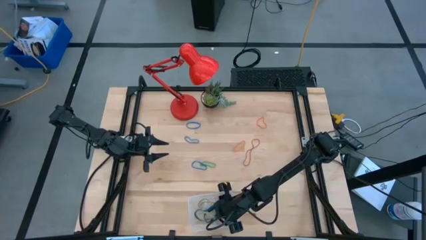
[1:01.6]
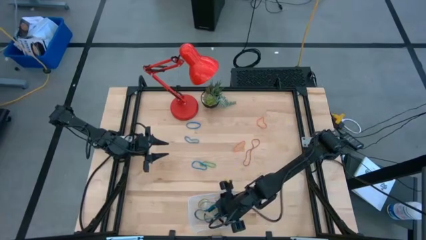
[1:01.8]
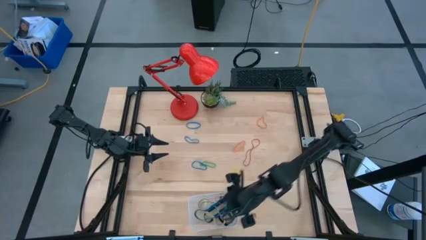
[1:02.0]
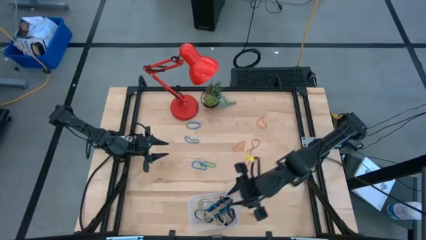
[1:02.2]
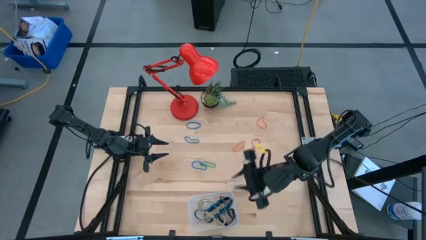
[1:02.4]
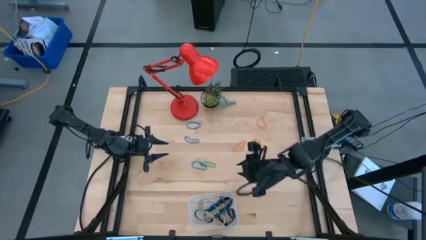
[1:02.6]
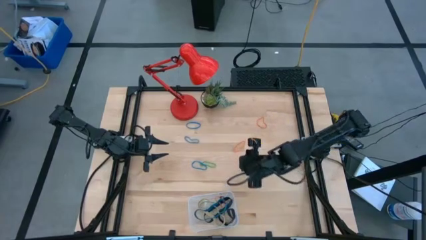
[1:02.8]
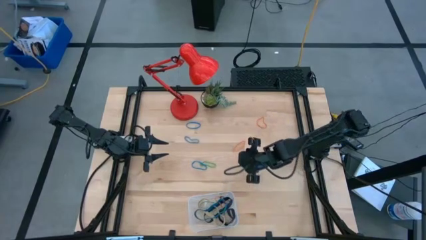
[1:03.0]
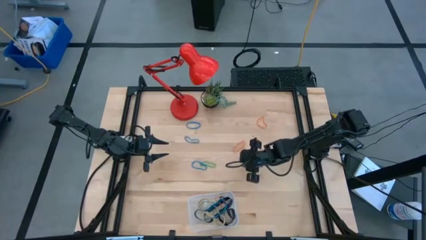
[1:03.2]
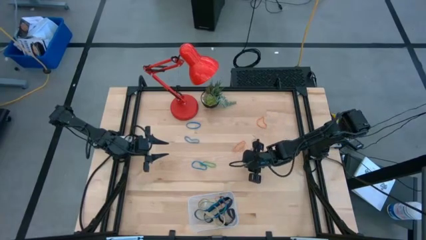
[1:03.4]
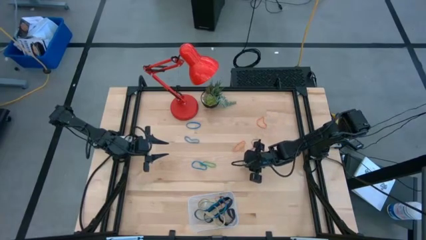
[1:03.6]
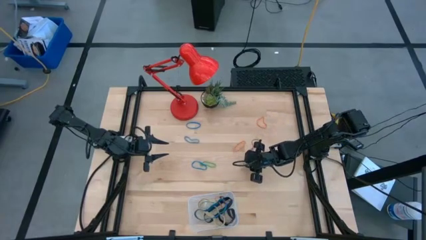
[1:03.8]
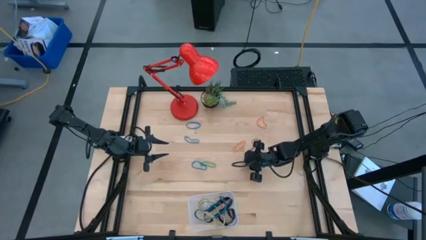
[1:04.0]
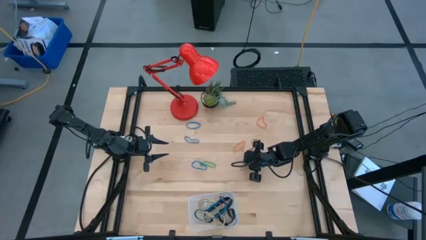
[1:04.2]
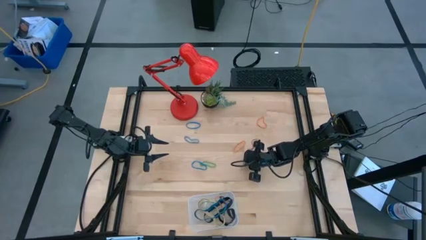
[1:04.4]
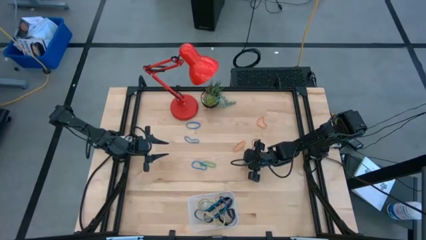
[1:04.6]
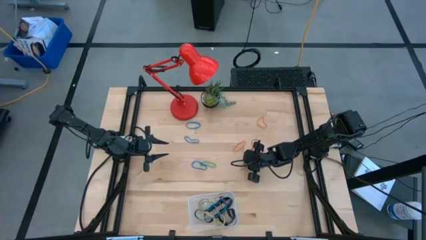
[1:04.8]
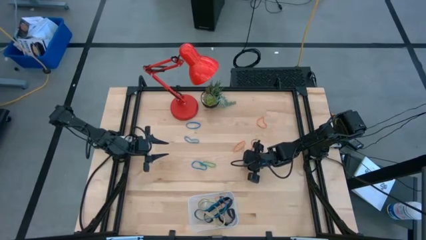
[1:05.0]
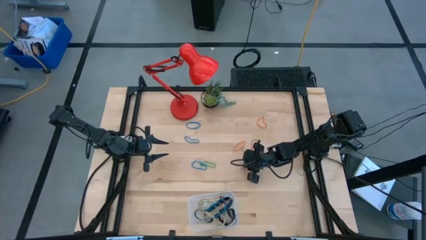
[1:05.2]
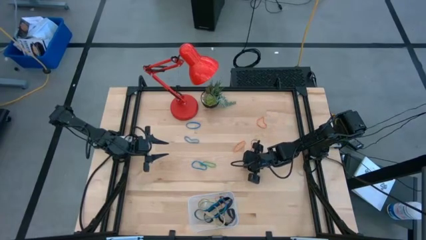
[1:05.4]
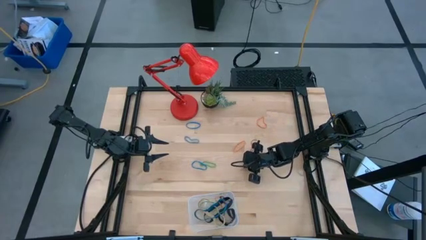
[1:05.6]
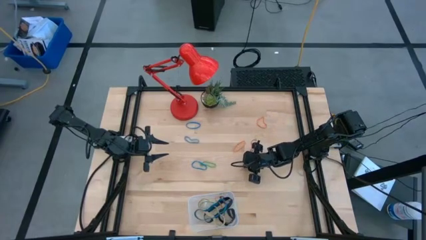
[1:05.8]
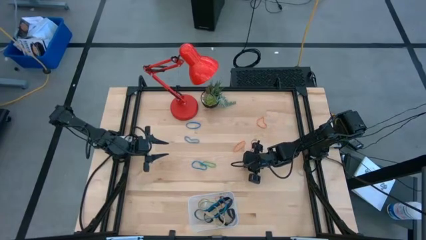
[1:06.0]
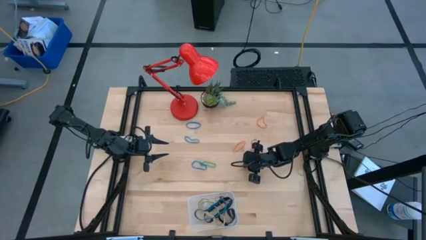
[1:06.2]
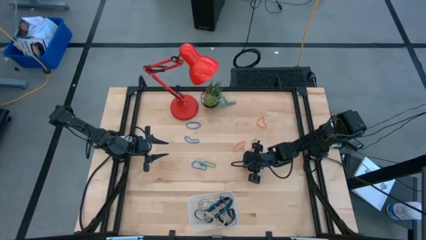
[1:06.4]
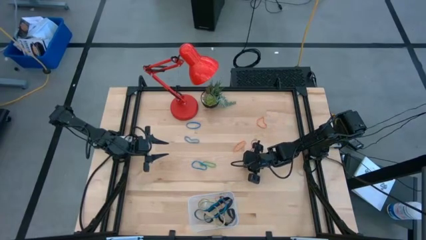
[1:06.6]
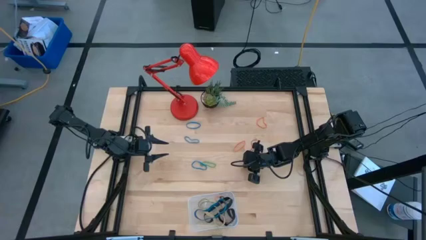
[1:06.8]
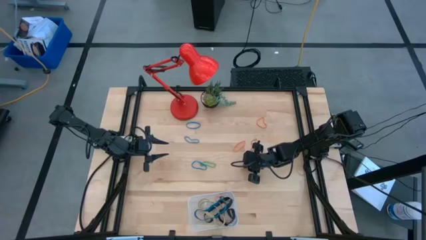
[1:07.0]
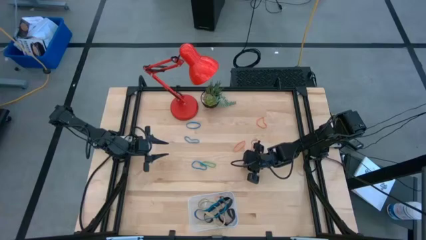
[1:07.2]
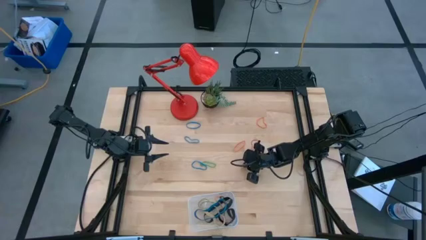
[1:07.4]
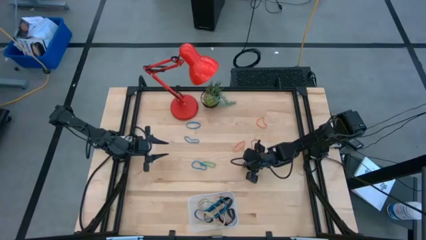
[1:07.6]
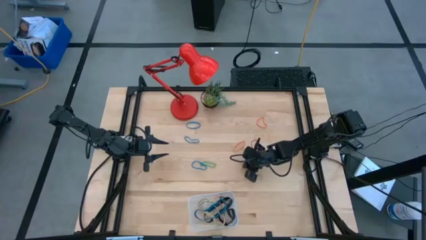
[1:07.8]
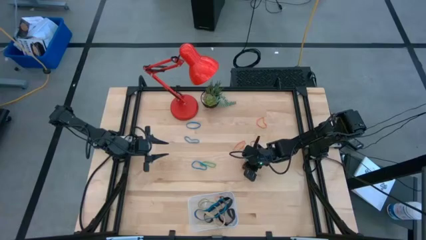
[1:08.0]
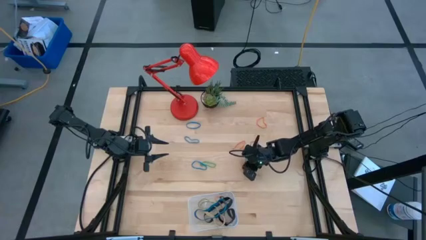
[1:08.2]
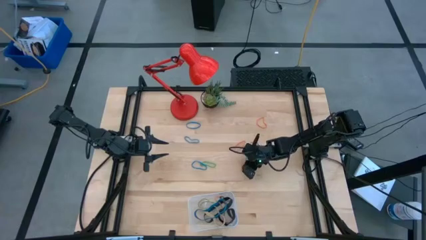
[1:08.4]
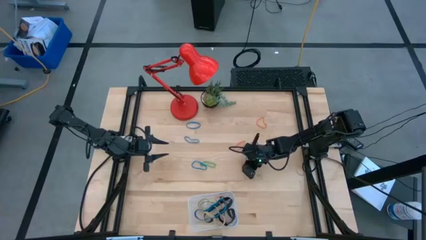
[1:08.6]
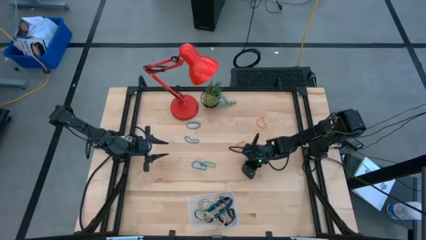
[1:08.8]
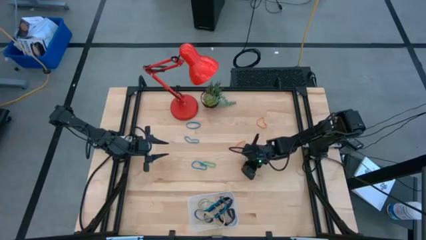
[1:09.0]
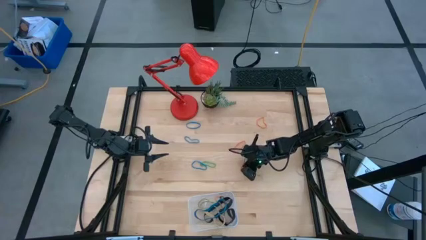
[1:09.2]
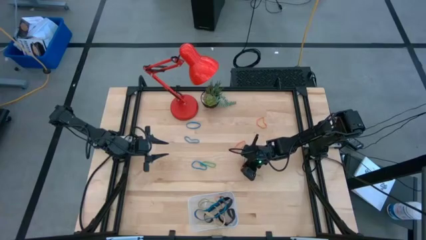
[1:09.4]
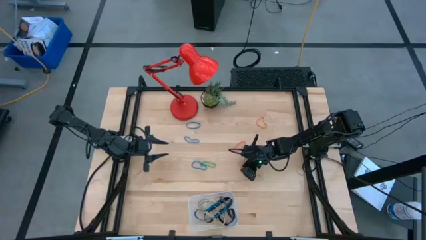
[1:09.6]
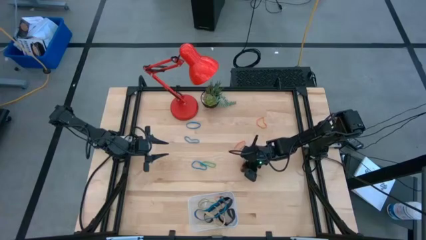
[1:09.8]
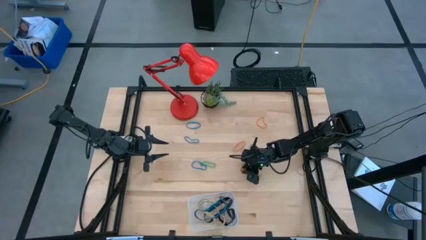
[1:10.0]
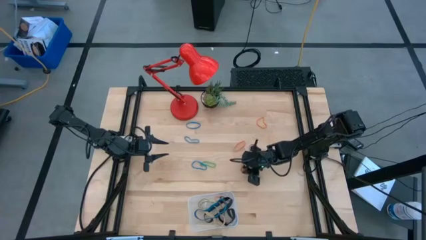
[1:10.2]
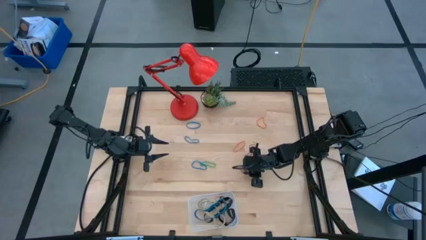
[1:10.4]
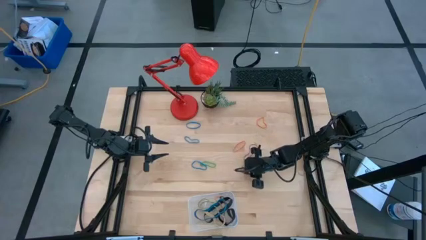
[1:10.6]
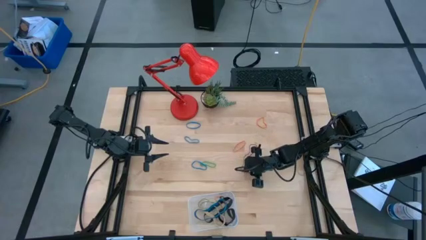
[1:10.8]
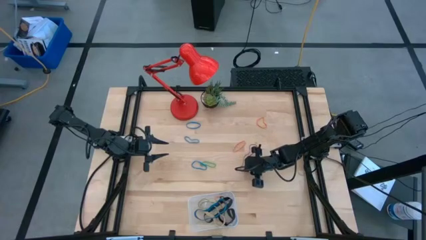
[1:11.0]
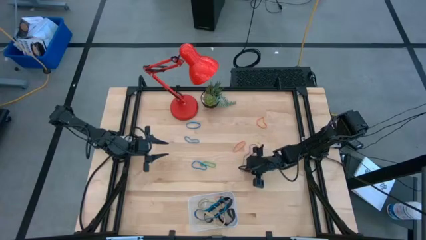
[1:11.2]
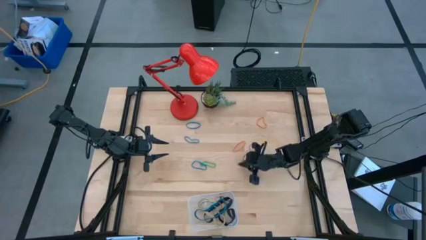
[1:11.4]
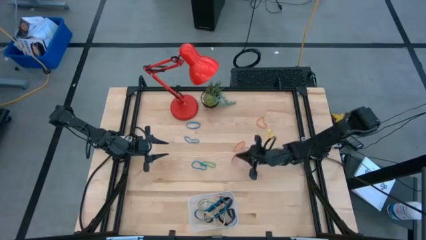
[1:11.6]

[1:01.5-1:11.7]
Task: Pick and place rubber bands into bin
Put the red rubber band into the transparent bin

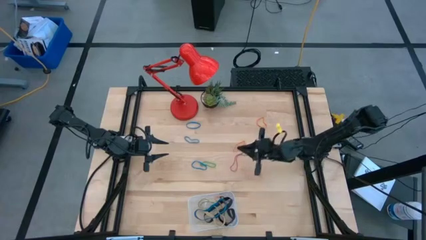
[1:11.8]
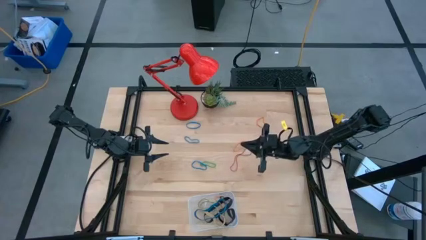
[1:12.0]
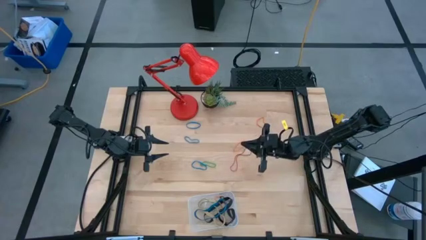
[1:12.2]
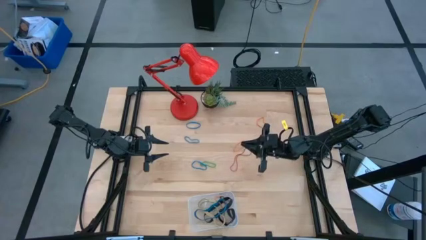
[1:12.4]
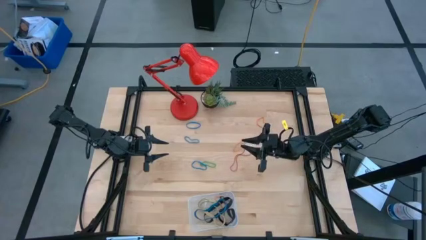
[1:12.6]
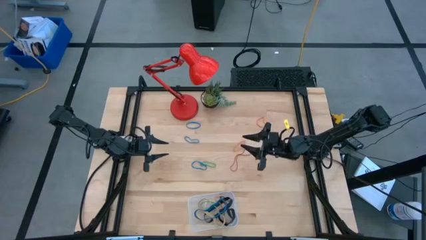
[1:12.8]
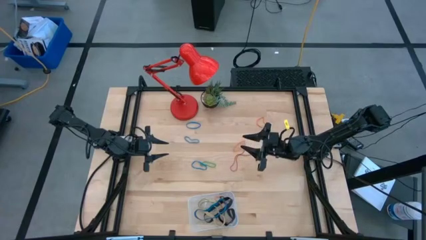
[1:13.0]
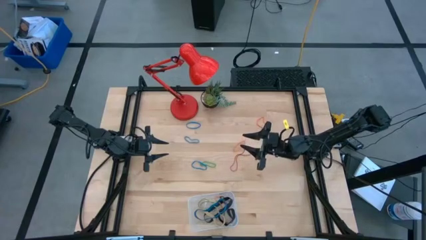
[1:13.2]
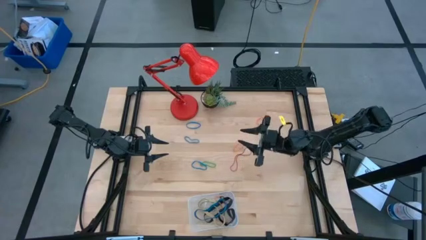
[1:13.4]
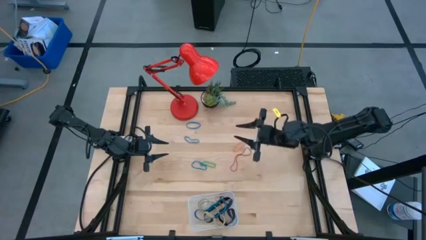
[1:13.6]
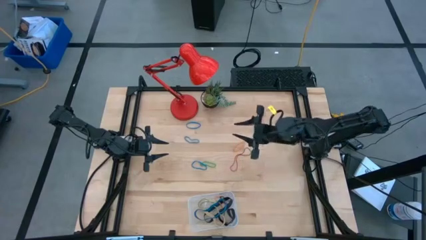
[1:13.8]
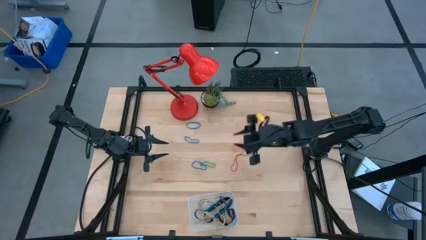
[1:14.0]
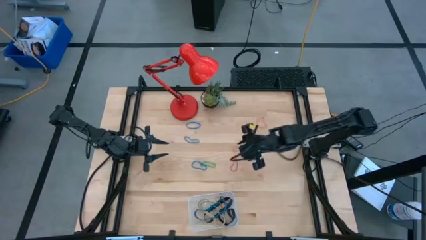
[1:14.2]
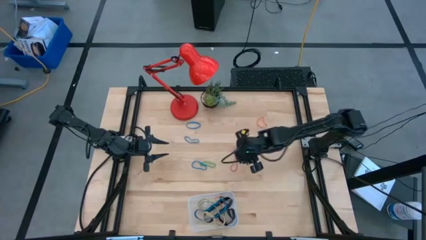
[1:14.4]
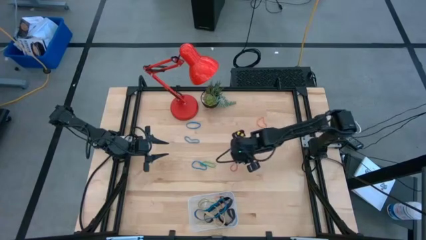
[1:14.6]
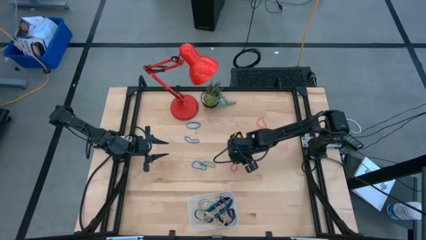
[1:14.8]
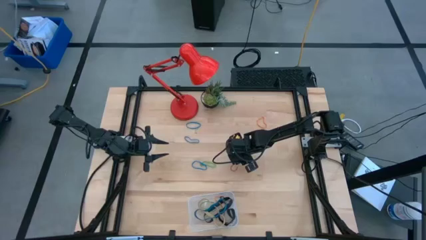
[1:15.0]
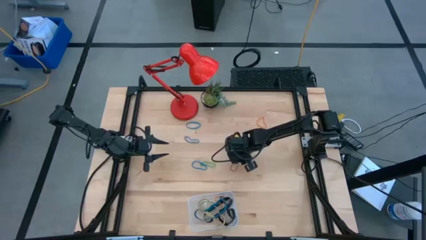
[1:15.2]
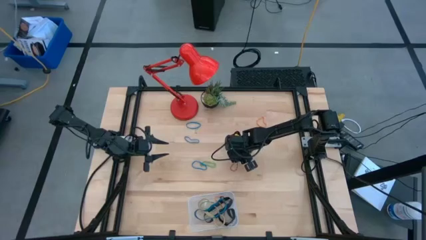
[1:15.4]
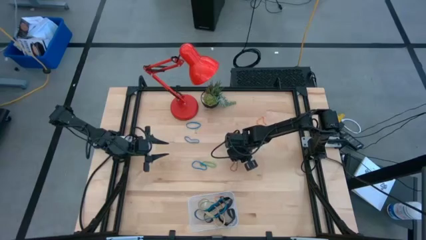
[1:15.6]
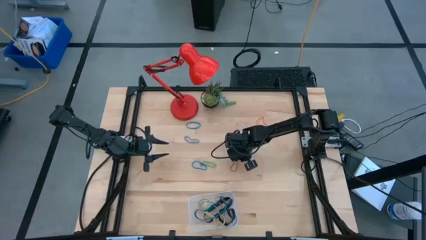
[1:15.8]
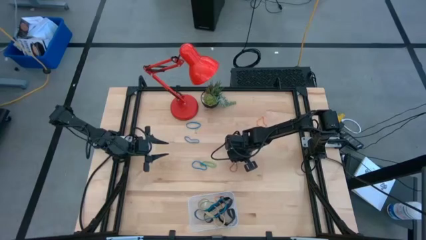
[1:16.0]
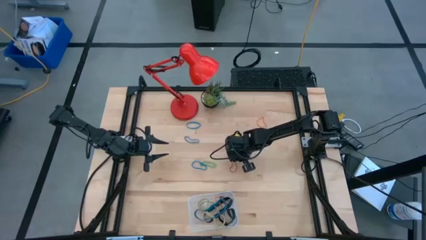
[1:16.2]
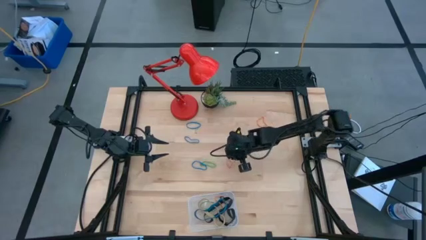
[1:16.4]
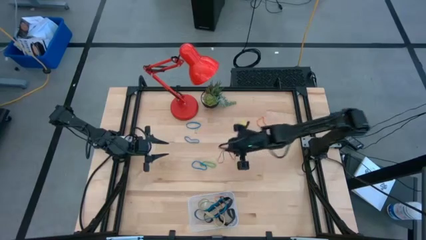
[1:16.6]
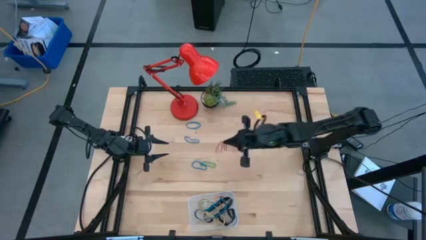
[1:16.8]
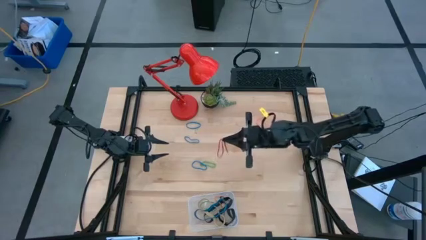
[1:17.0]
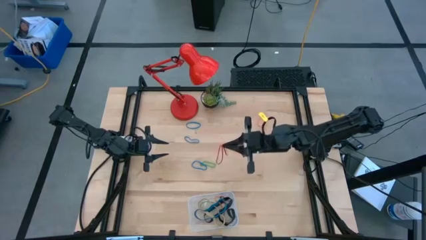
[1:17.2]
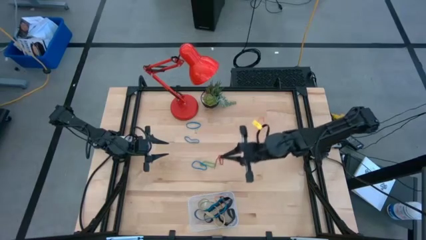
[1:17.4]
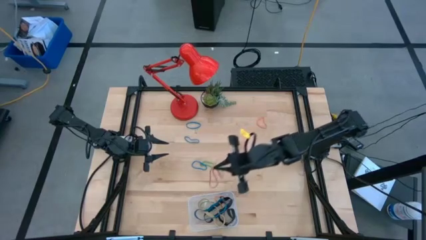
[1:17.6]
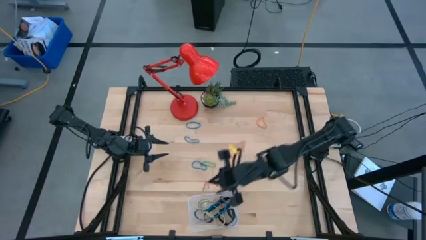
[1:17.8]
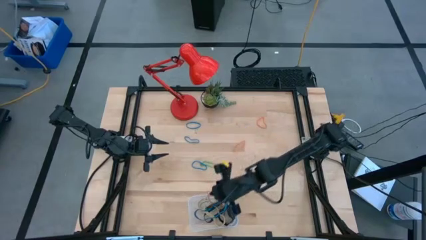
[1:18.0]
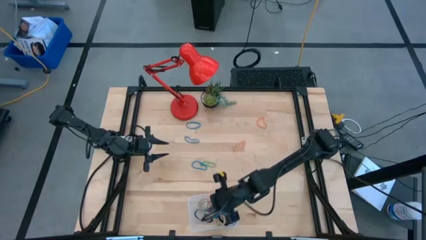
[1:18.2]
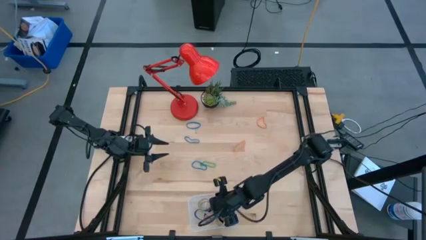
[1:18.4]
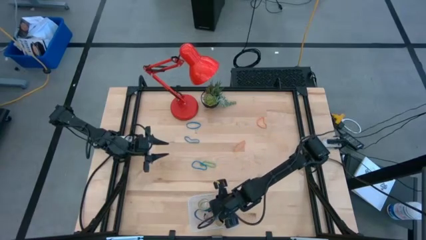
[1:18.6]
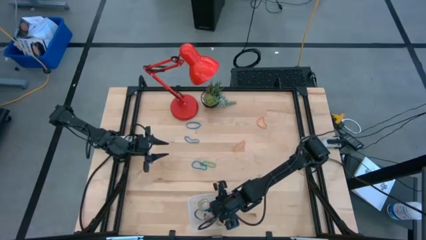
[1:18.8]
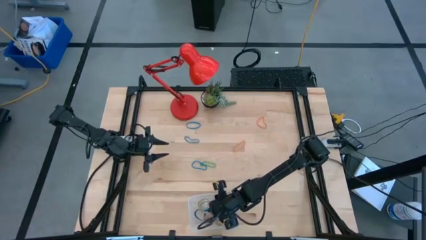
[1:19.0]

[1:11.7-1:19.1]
Put the red rubber band into the transparent bin
